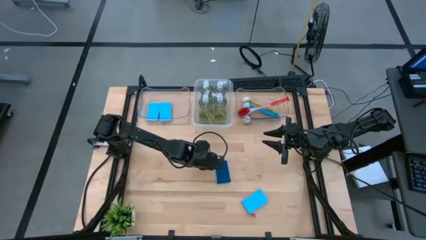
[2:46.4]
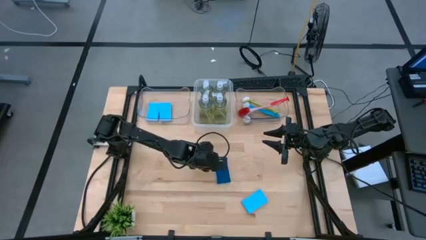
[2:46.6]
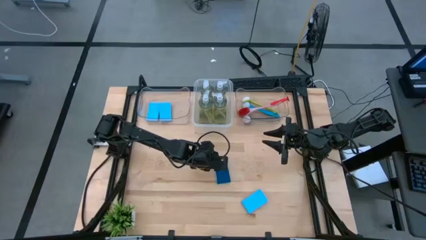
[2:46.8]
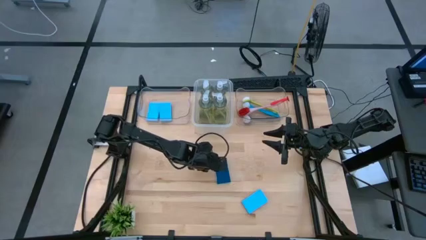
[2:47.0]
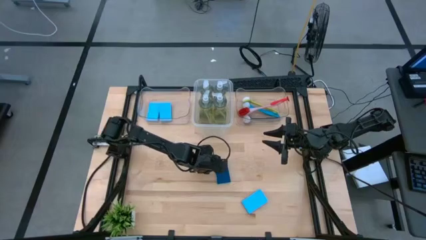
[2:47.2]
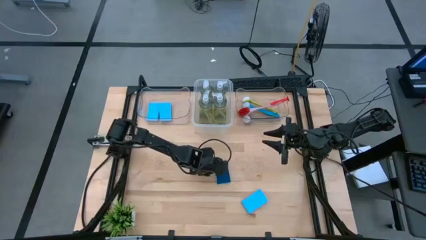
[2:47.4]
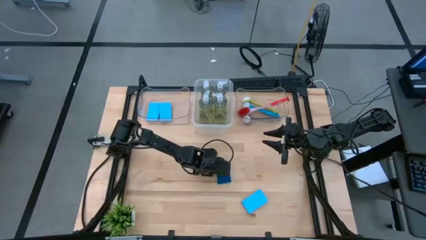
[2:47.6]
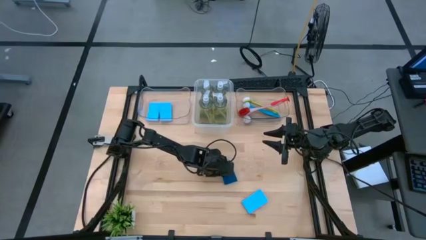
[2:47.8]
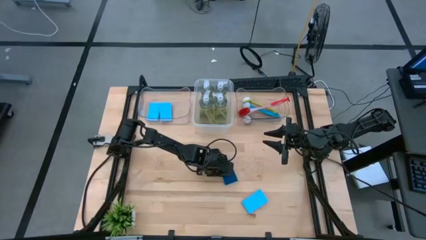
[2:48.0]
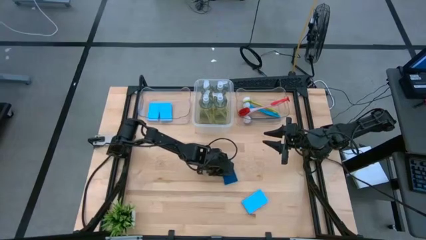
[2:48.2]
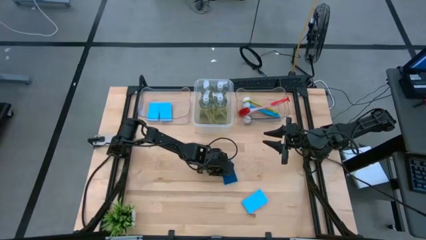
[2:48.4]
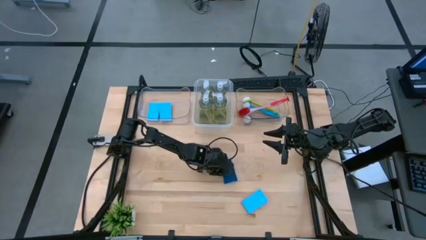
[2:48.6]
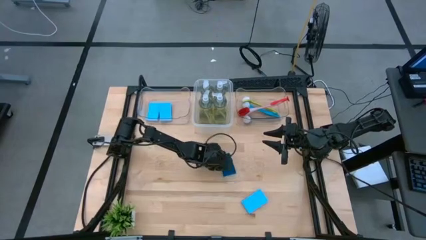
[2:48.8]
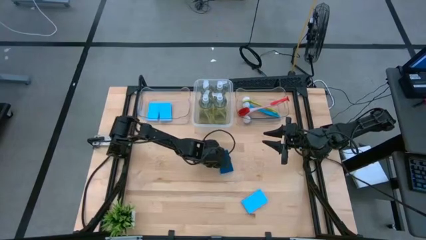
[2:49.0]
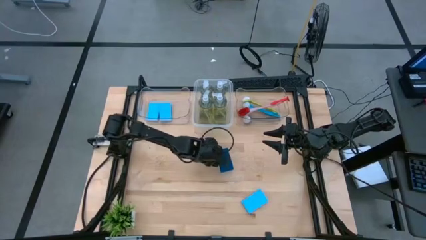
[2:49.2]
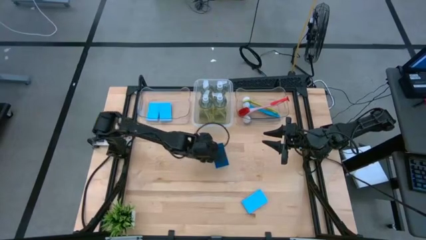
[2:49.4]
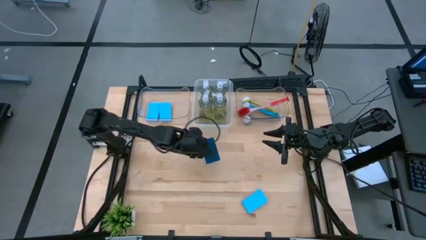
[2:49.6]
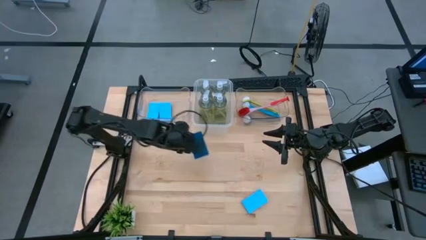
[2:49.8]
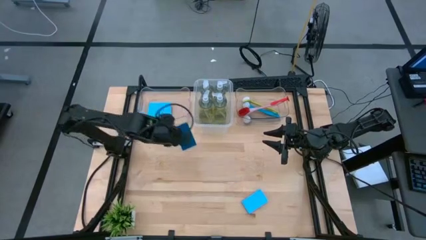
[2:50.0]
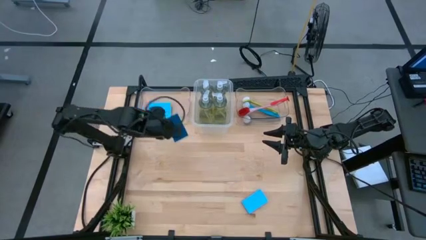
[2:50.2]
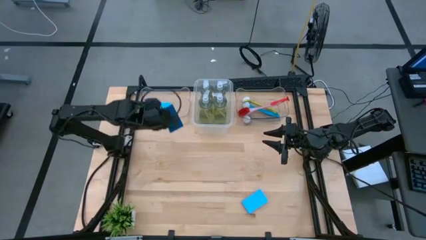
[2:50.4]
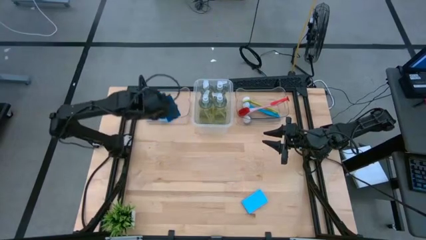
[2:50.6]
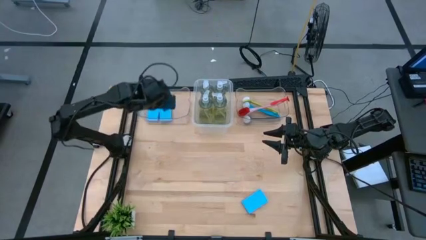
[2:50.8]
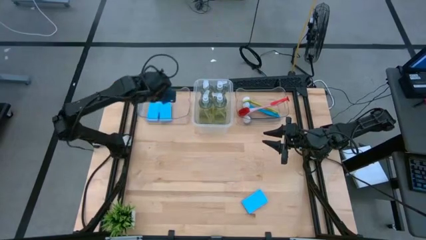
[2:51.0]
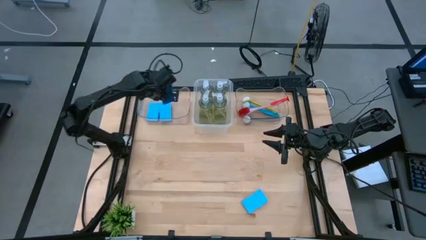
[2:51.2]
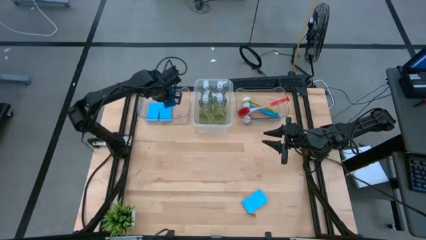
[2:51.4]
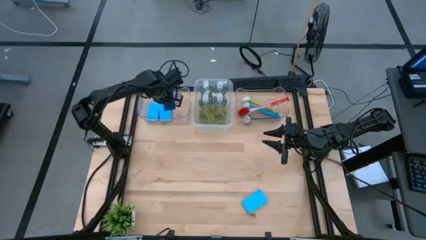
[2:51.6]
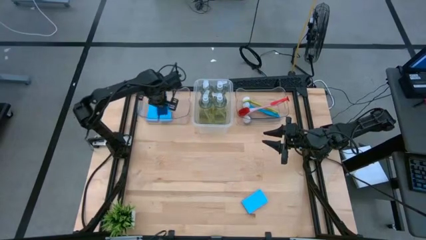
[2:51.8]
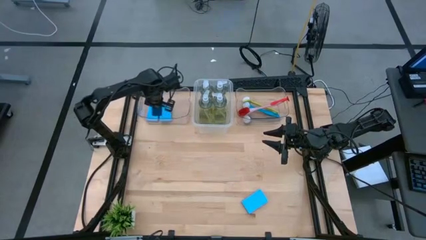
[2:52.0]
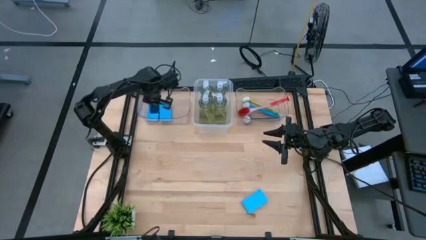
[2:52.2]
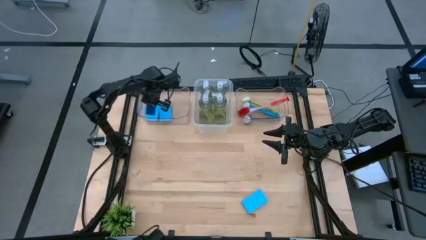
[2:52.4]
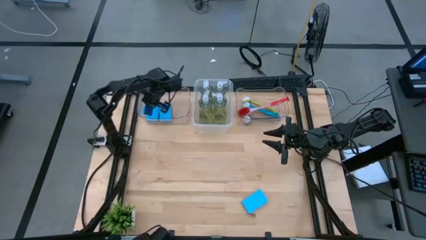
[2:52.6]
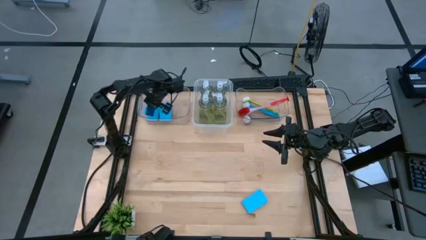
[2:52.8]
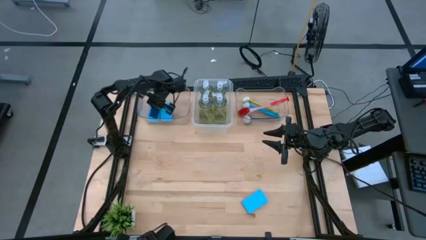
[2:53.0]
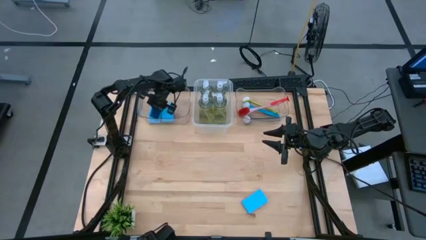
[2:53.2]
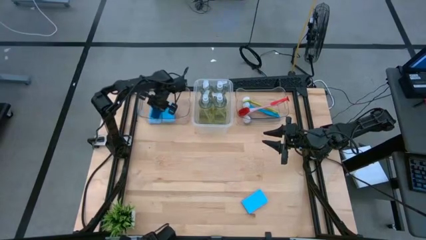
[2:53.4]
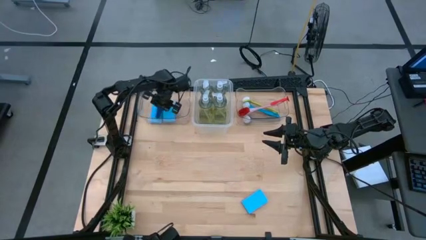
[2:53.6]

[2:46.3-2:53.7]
Task: Pick & Place Kitchen Sink Supplies
Put the blue sponge into the left transparent bin

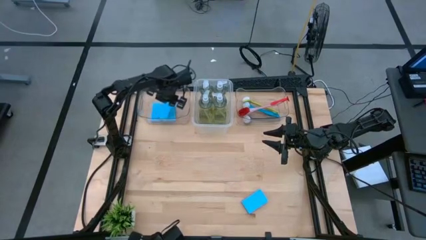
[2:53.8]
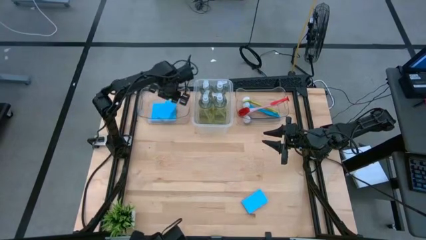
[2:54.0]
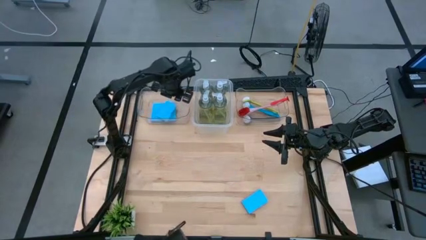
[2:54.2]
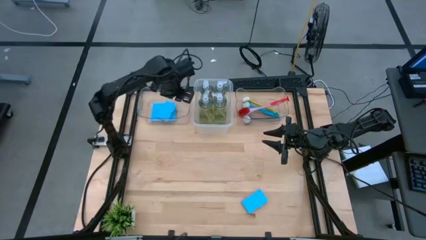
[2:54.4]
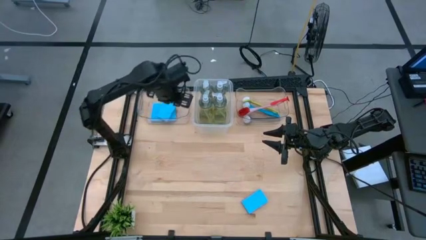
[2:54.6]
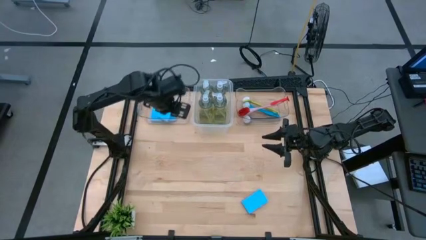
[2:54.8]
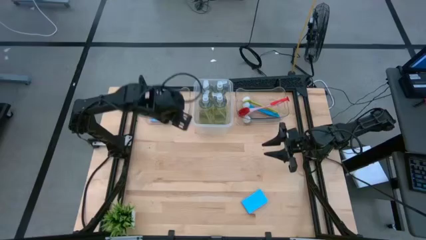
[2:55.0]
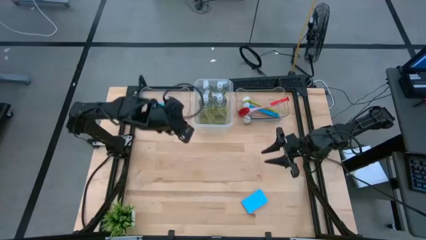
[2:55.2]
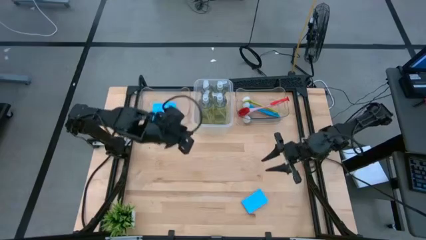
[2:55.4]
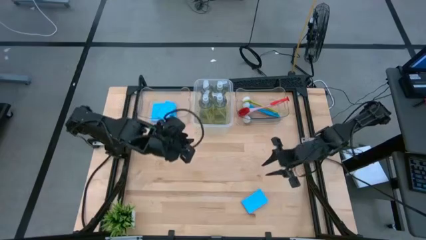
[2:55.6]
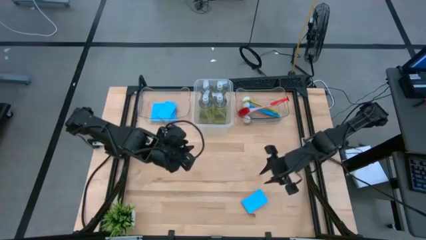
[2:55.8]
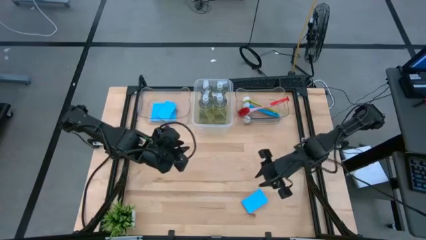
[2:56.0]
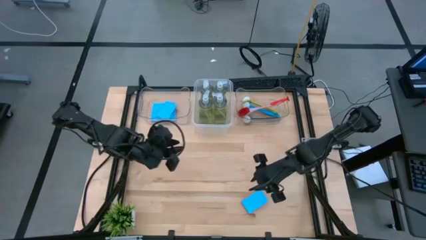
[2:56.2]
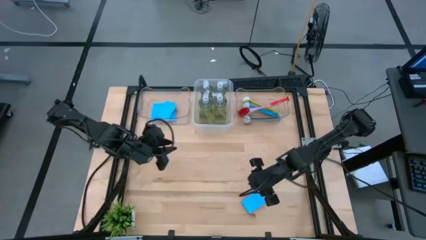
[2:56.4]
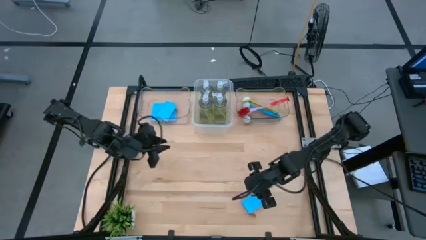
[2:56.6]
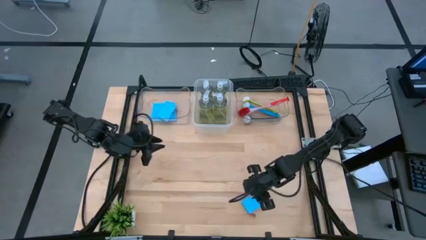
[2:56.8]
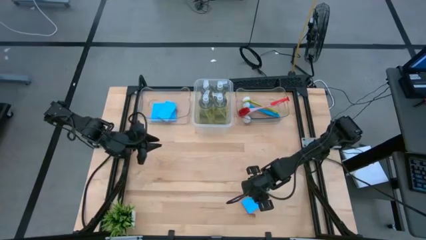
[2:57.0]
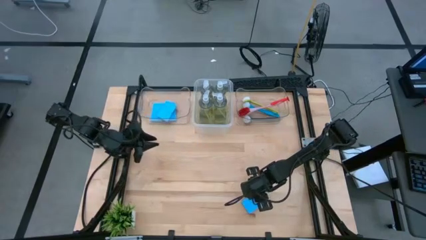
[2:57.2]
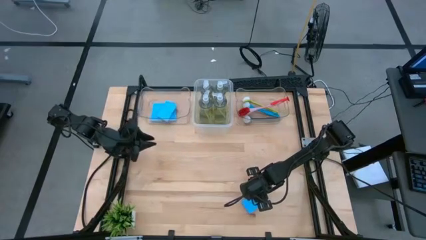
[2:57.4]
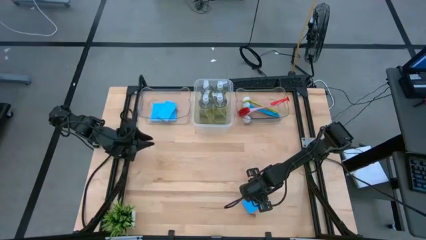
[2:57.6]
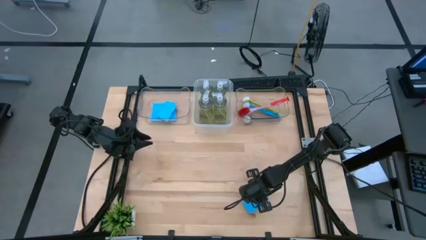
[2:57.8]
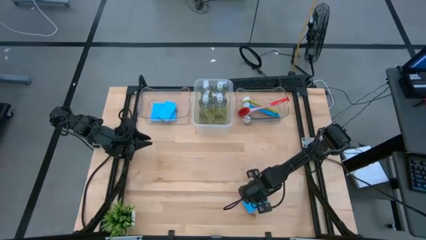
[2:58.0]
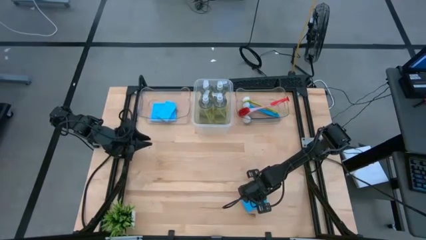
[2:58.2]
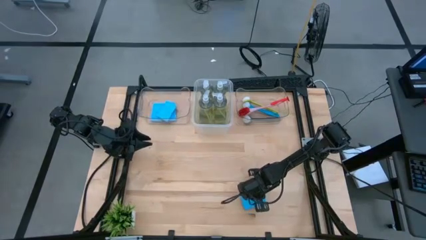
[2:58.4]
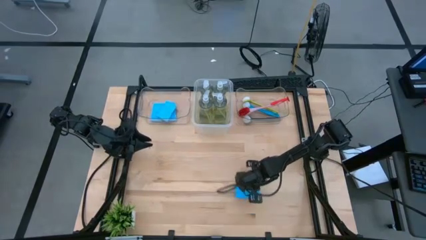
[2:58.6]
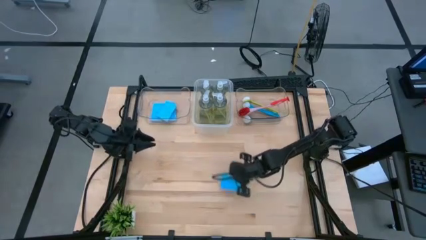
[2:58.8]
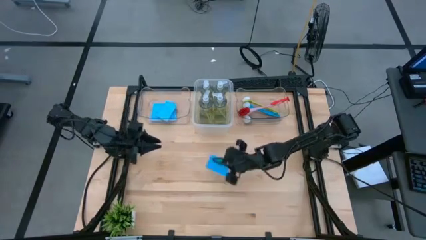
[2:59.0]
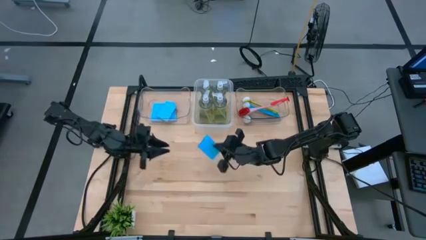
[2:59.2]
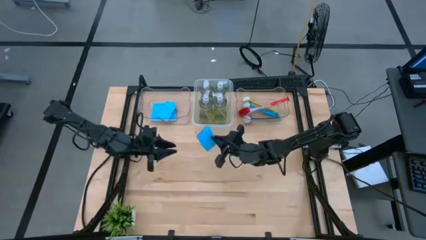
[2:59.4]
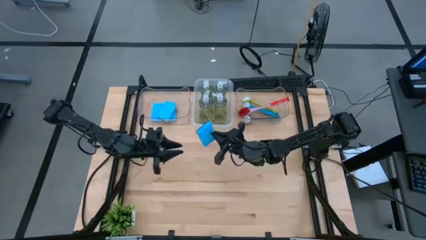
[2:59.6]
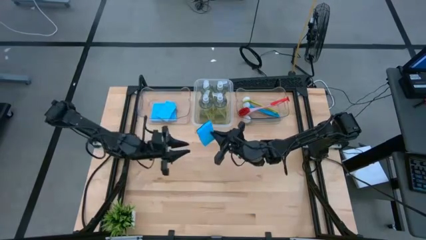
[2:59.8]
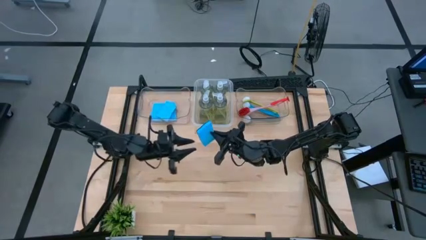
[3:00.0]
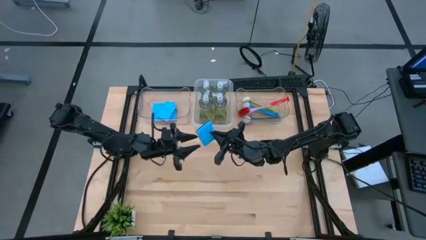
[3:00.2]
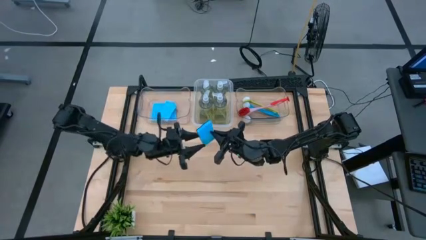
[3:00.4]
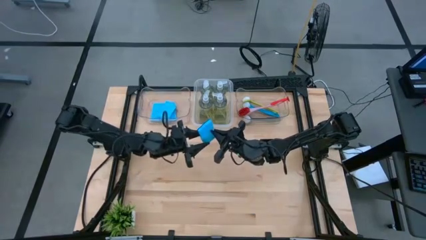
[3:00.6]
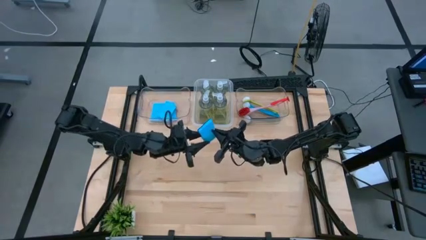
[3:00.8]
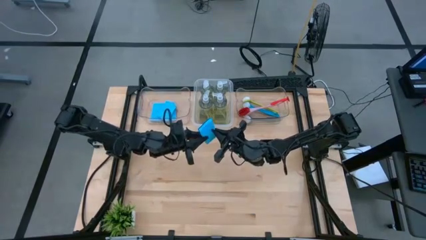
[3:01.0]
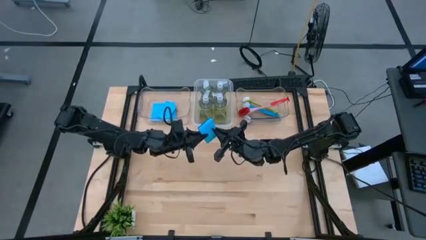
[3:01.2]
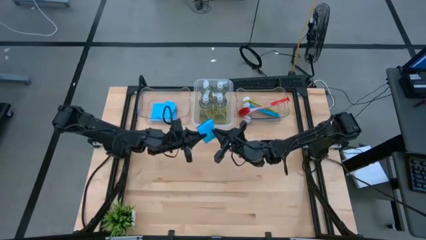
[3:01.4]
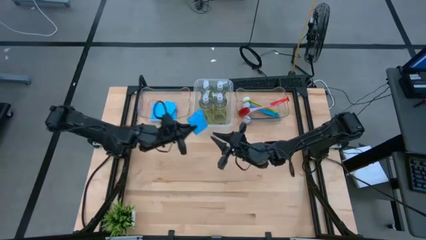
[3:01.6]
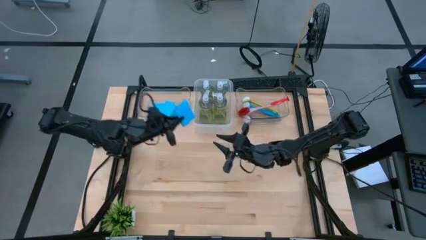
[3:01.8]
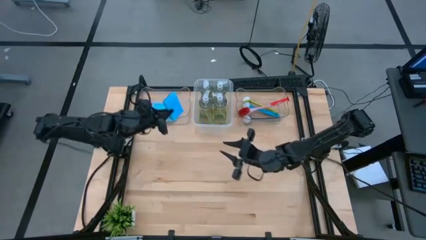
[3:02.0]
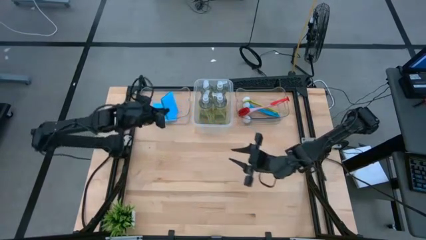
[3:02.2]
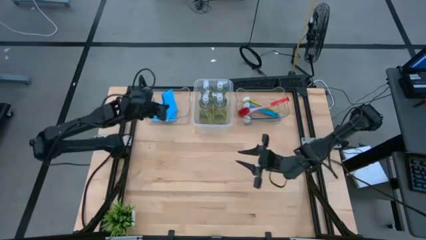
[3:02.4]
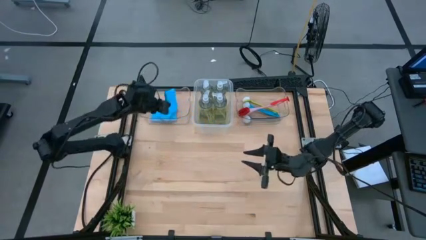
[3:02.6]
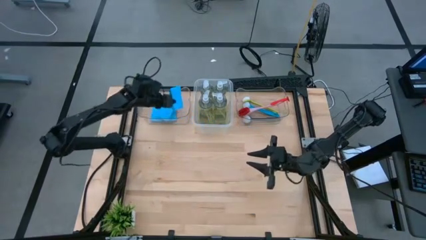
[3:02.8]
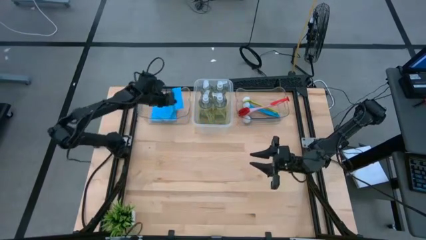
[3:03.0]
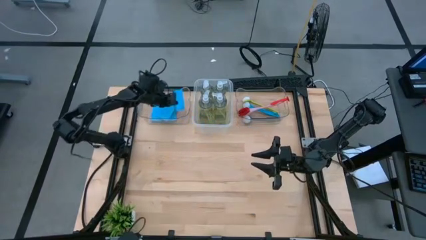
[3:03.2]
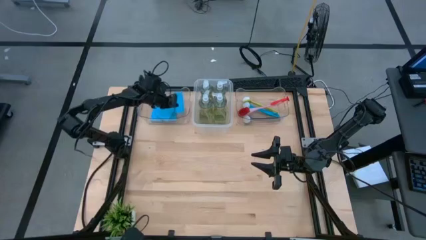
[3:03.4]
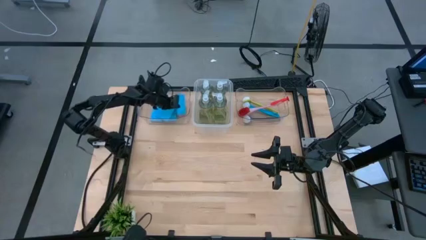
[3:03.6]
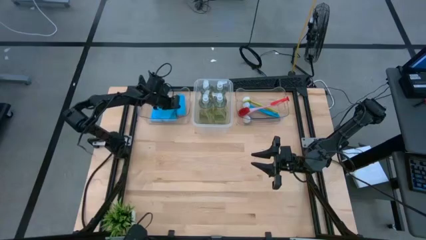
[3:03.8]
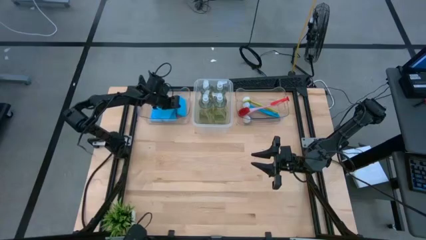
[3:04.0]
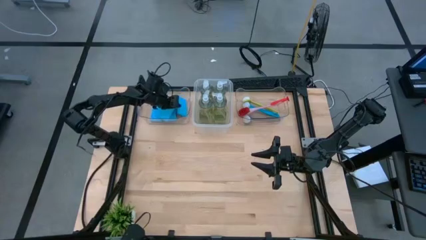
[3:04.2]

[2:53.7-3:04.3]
Put the blue sponge into the left transparent bin
